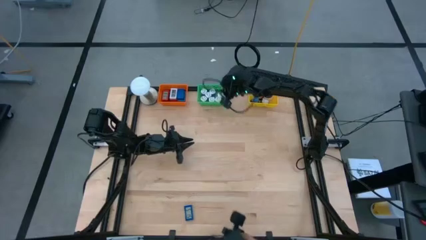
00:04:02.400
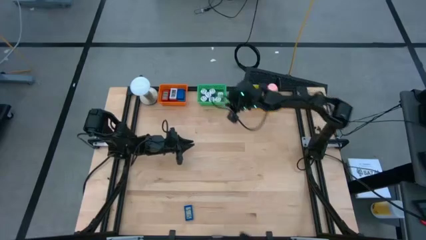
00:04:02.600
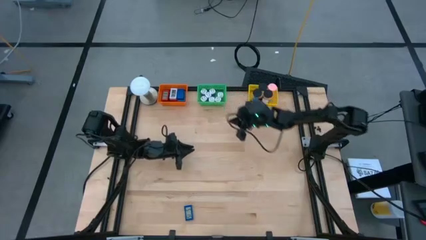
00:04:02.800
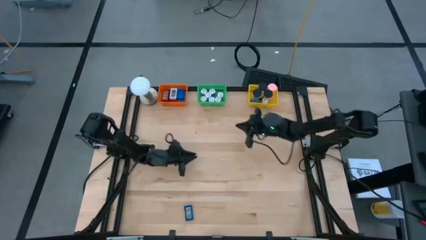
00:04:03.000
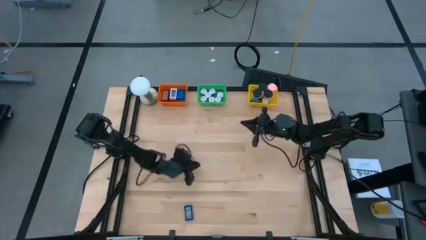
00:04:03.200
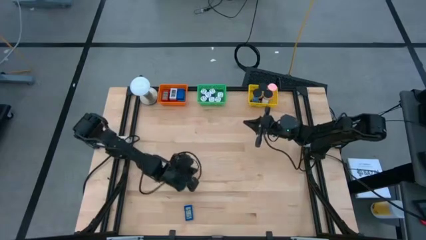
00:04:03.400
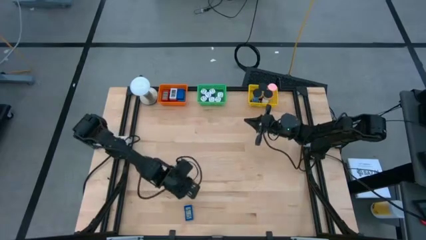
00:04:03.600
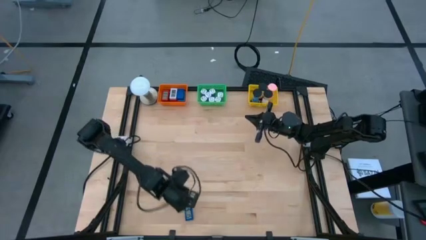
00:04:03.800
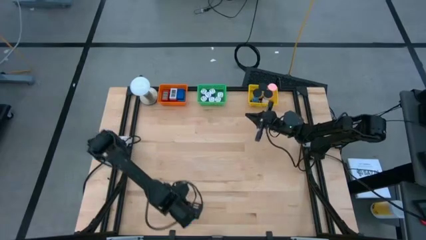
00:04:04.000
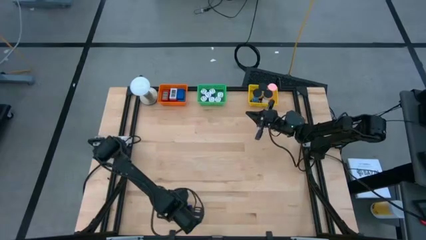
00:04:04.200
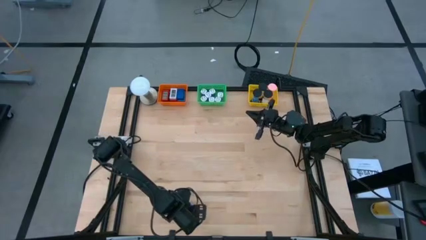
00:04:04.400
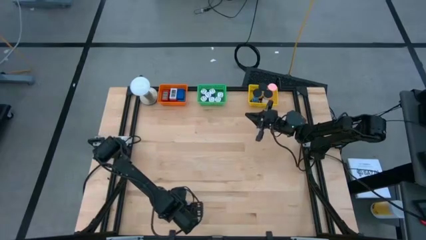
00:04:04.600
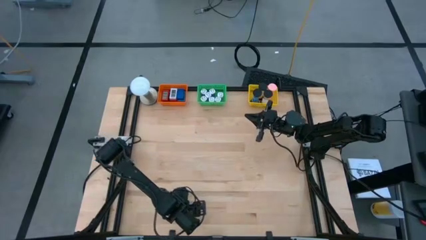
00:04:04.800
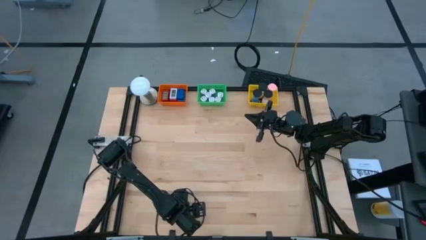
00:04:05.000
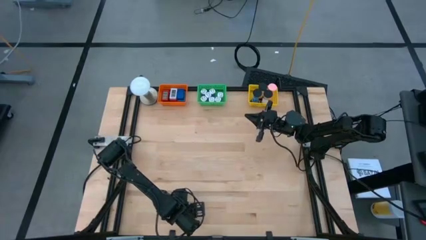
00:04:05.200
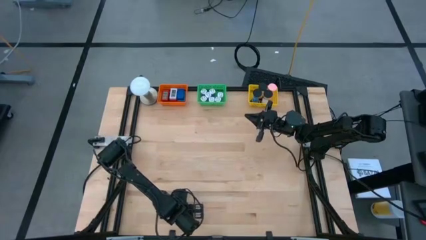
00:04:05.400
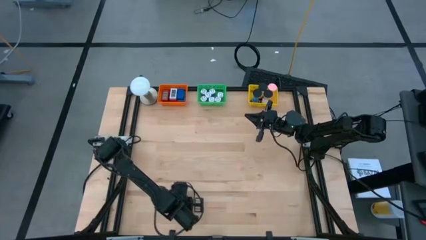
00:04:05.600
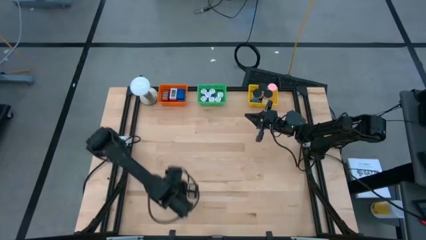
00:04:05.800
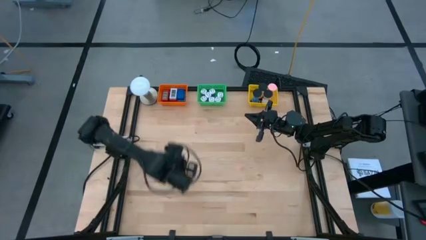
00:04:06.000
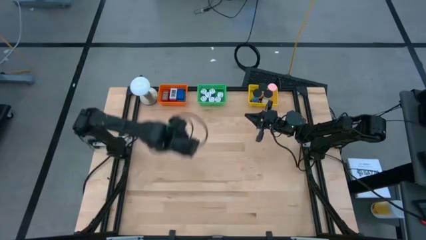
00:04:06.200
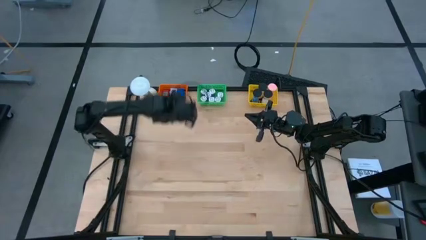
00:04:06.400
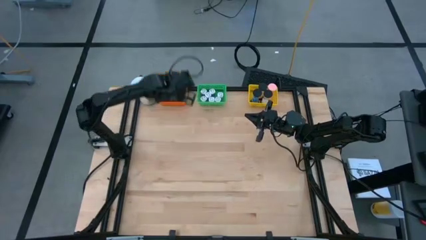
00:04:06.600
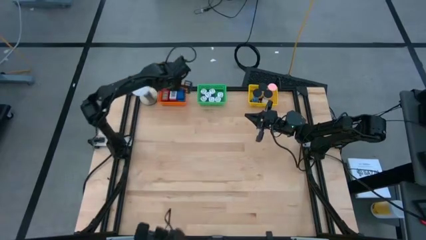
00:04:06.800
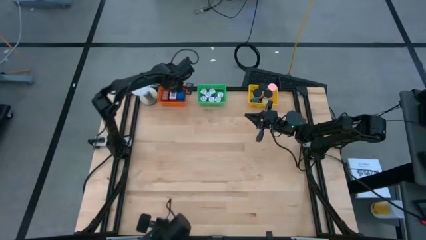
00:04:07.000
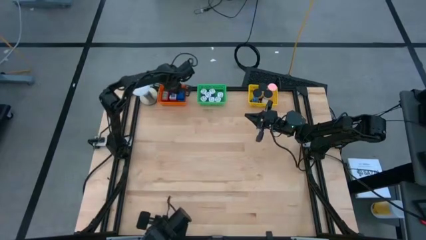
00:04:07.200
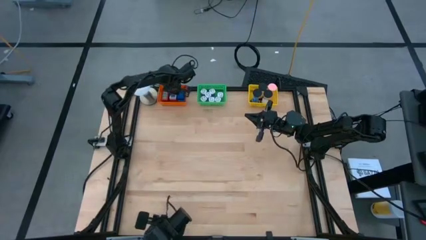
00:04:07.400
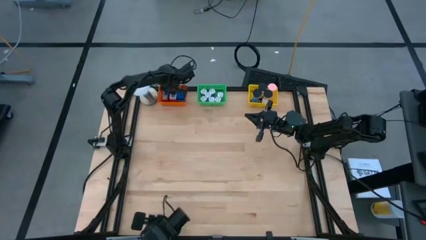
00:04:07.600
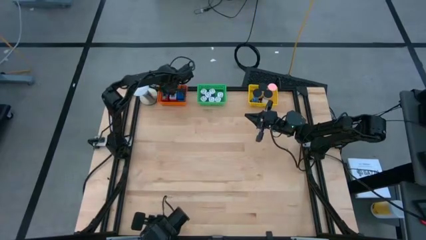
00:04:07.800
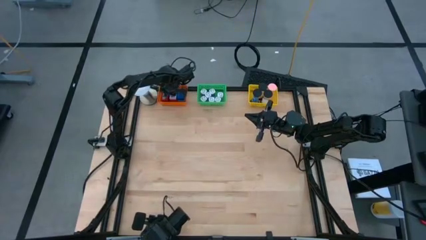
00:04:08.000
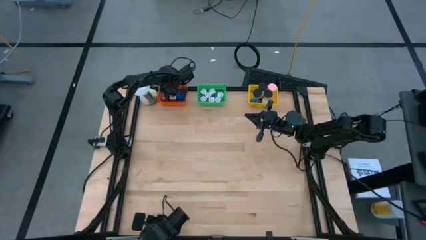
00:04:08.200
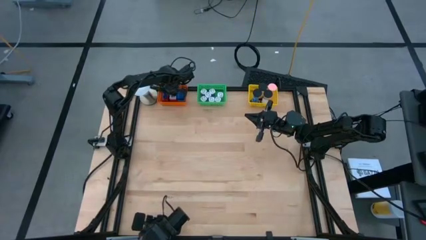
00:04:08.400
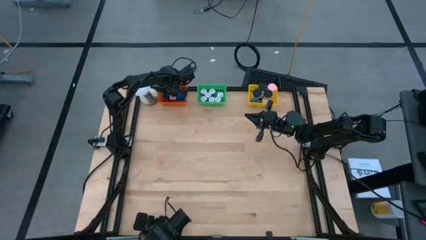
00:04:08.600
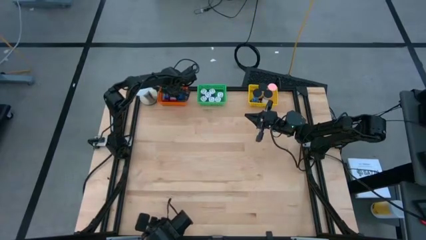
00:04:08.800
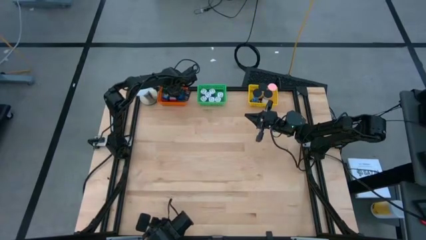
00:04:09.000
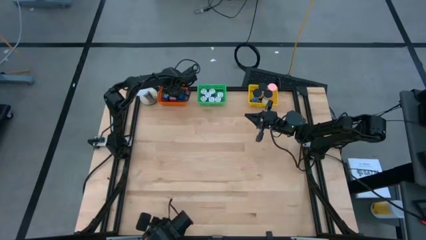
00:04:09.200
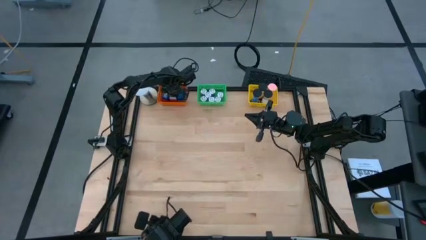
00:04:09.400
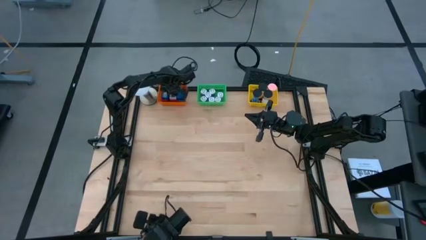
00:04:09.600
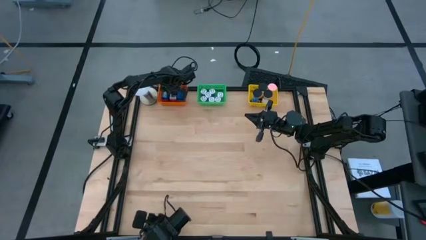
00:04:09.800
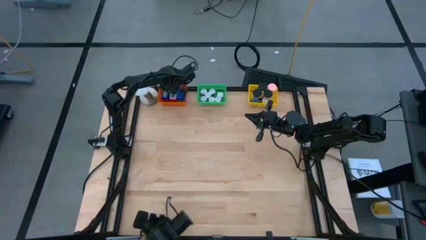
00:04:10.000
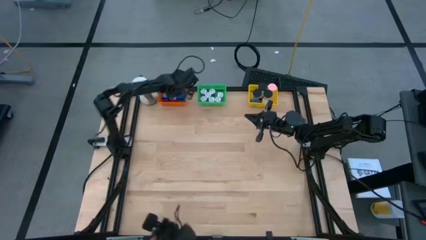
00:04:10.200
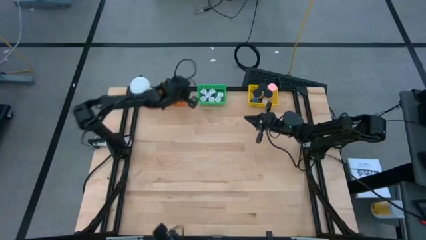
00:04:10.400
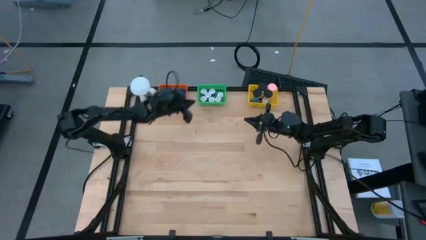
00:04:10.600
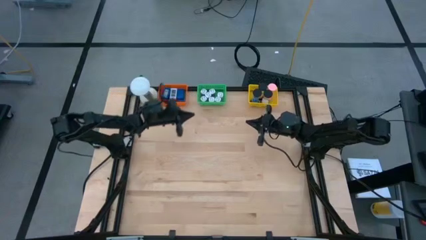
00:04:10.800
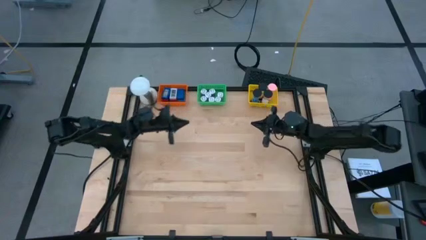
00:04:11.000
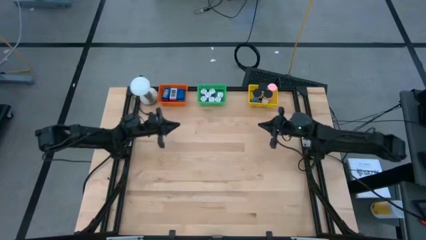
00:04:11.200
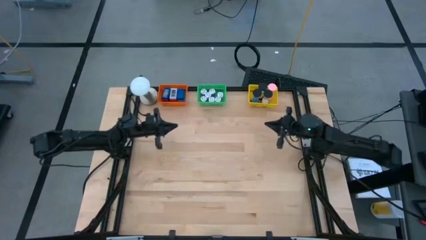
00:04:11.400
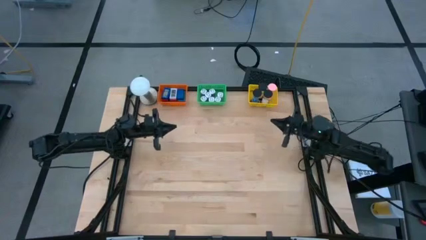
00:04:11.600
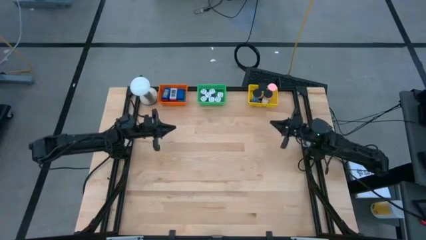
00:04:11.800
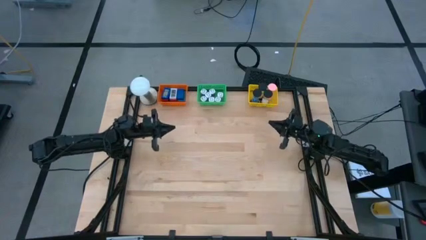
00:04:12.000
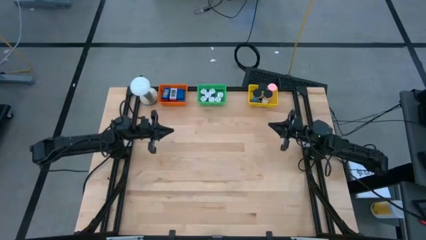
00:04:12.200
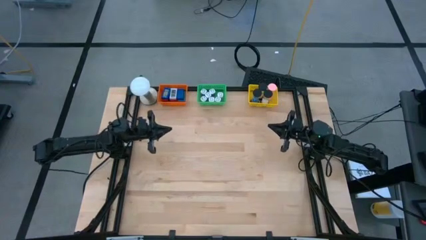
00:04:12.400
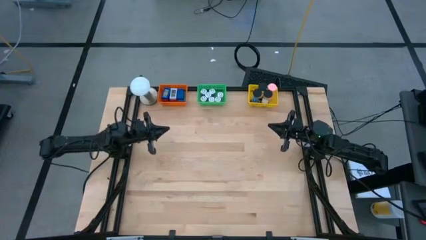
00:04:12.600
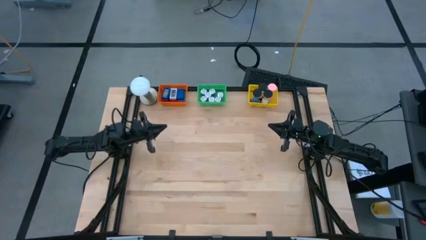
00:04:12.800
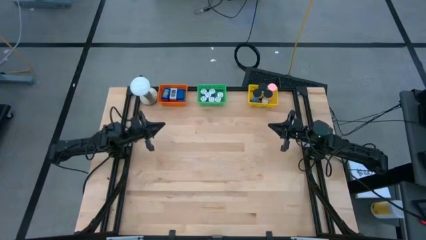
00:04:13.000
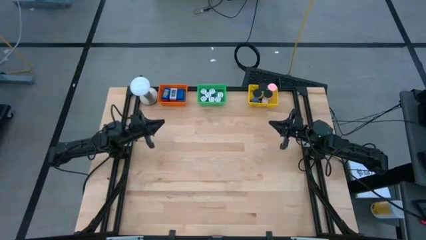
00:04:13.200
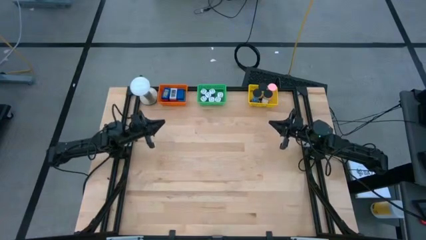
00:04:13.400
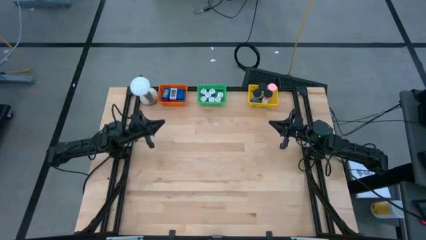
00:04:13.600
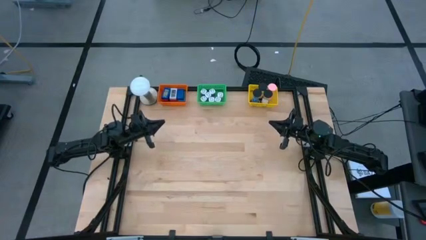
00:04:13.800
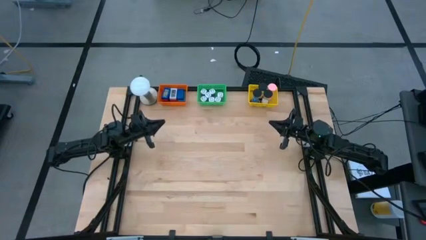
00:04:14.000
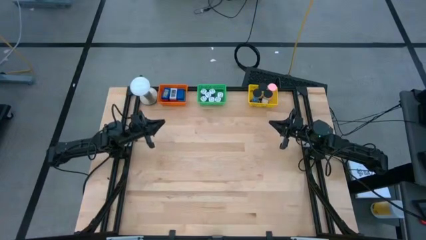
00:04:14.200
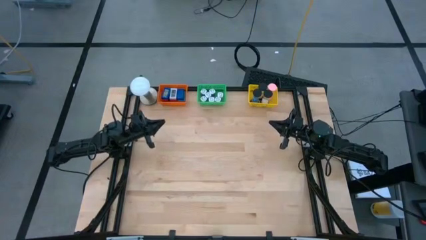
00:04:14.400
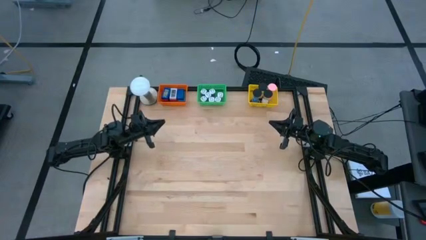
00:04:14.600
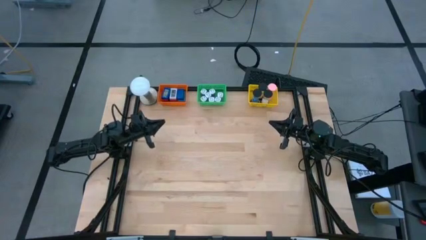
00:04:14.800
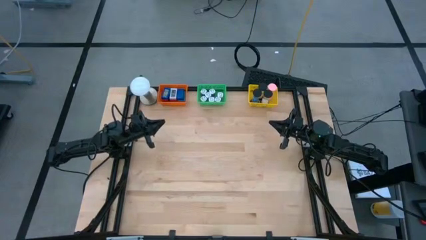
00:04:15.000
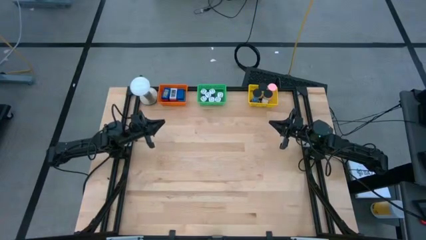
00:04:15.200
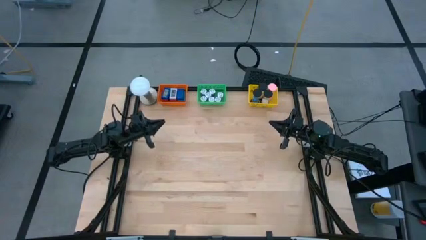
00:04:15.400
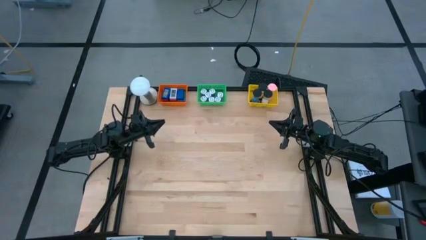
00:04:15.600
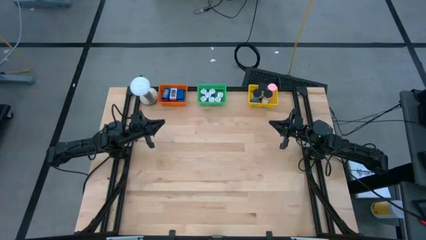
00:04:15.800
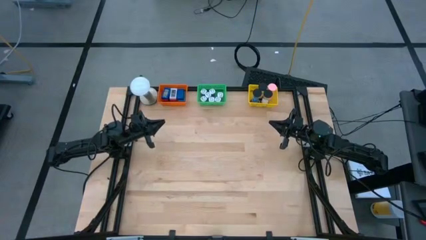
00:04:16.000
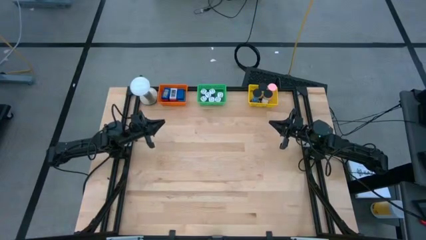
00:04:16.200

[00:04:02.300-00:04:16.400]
Task: Pick & Place Office items
Return to Home Position
